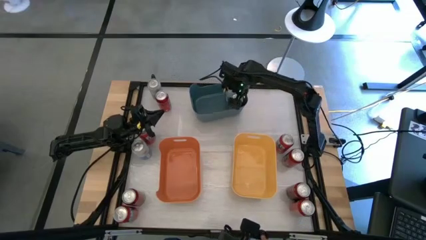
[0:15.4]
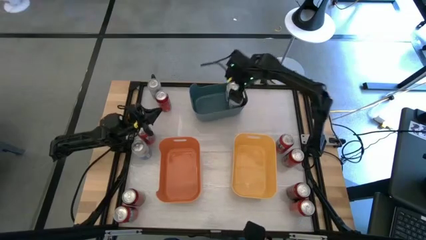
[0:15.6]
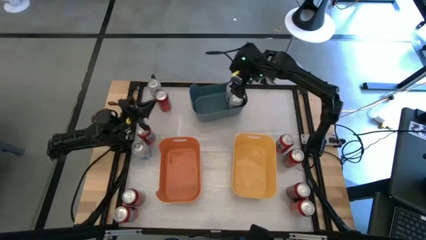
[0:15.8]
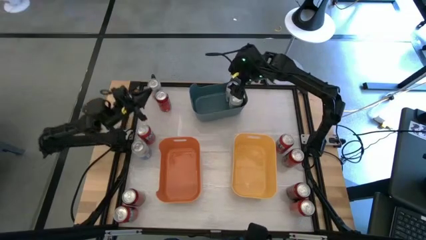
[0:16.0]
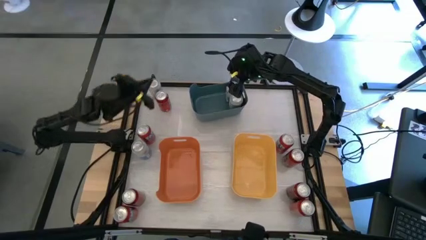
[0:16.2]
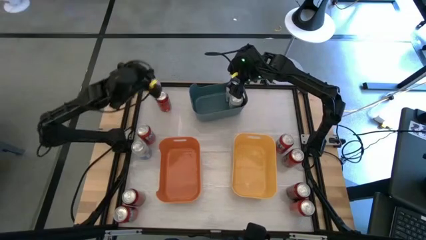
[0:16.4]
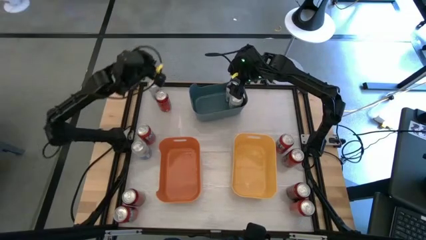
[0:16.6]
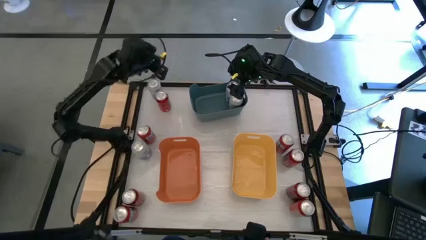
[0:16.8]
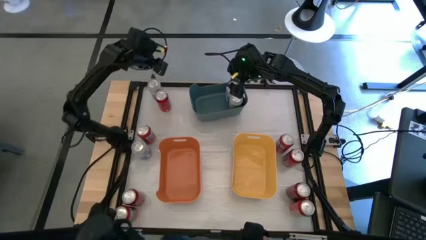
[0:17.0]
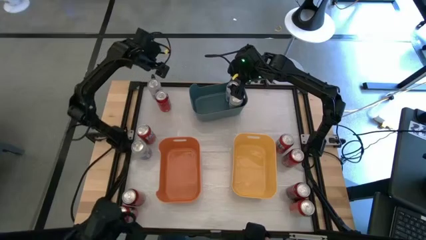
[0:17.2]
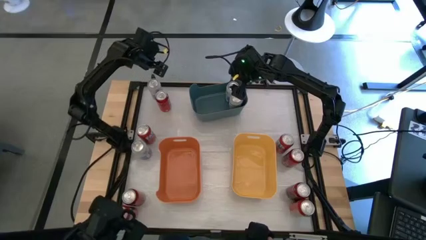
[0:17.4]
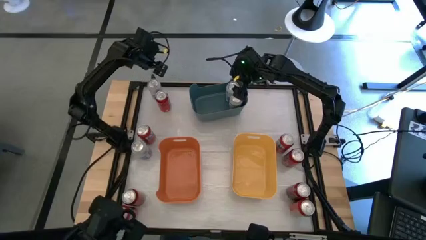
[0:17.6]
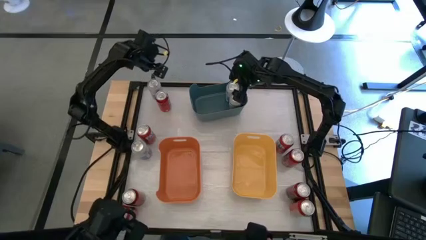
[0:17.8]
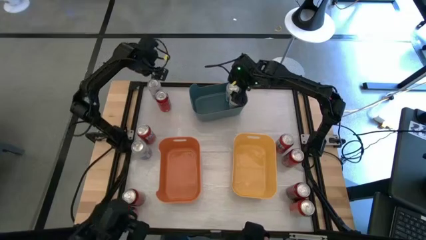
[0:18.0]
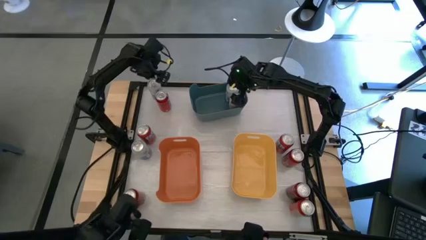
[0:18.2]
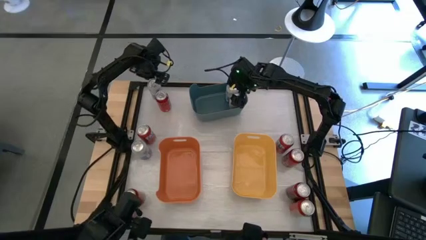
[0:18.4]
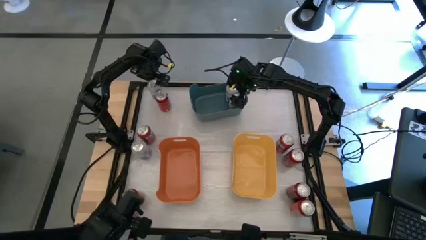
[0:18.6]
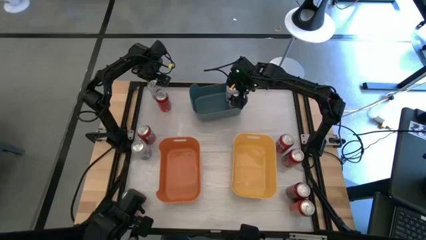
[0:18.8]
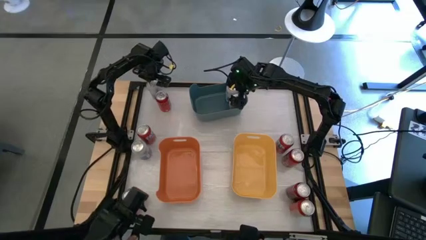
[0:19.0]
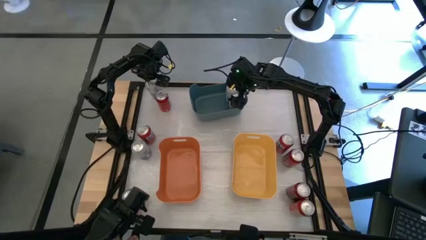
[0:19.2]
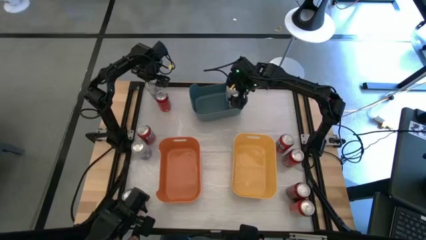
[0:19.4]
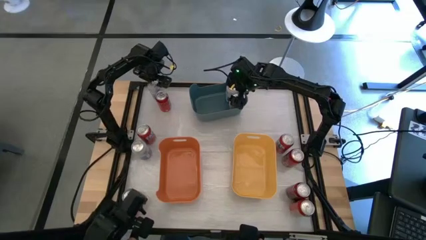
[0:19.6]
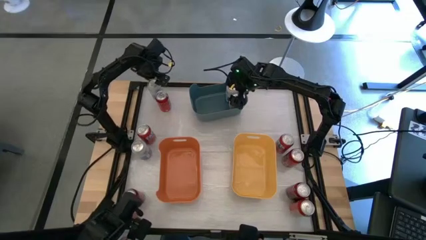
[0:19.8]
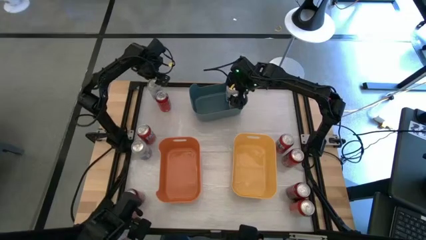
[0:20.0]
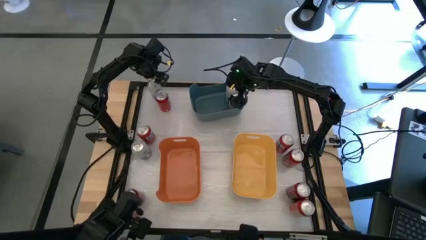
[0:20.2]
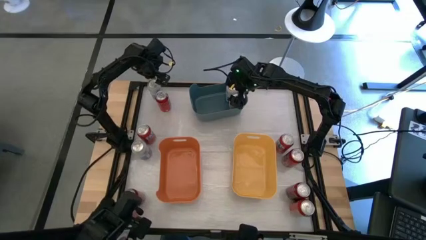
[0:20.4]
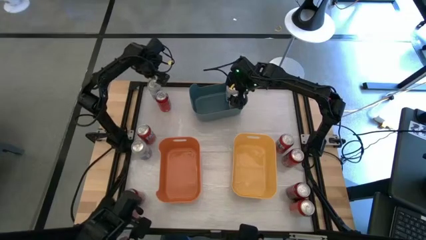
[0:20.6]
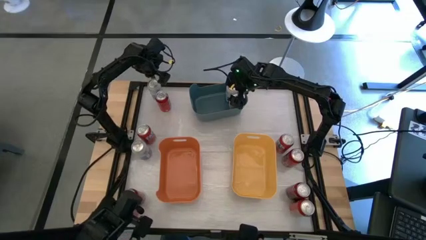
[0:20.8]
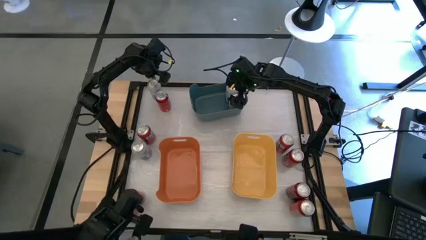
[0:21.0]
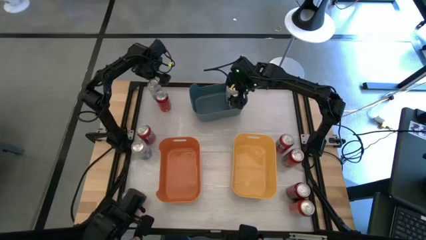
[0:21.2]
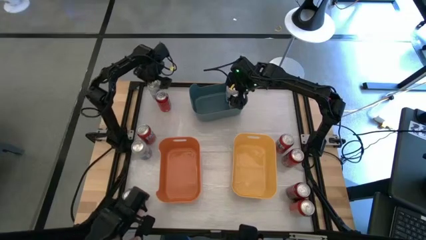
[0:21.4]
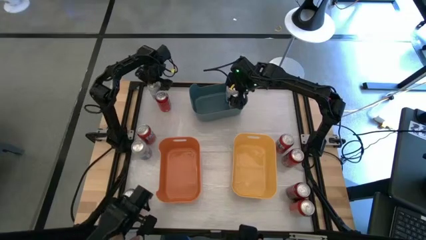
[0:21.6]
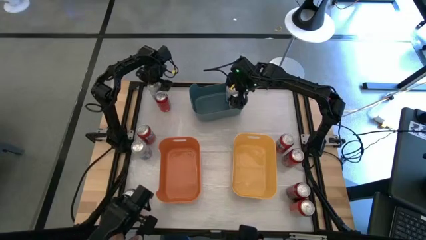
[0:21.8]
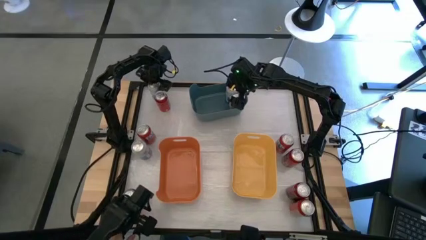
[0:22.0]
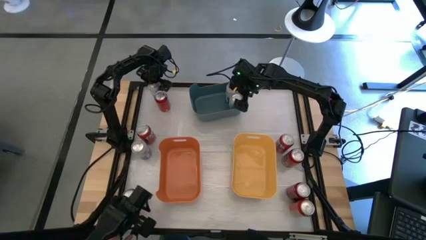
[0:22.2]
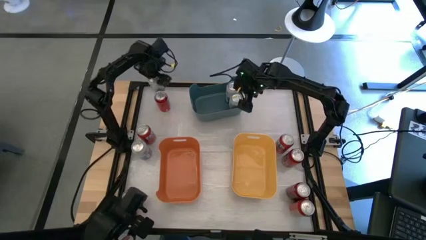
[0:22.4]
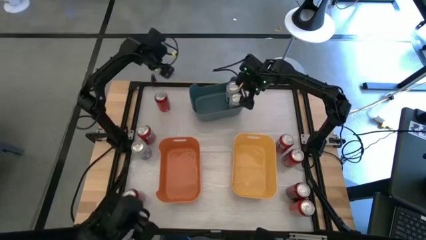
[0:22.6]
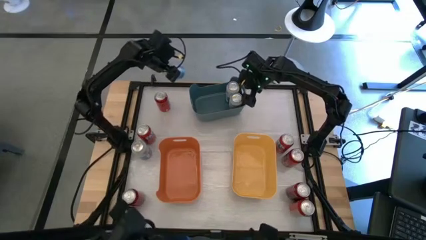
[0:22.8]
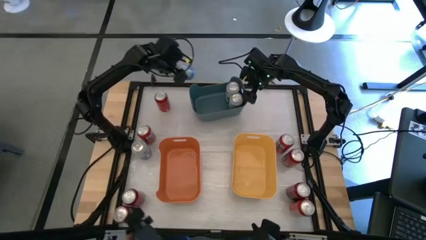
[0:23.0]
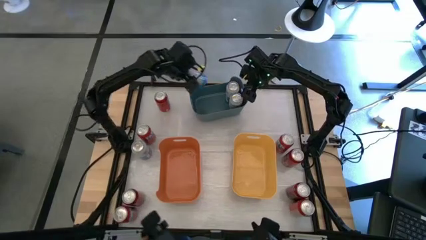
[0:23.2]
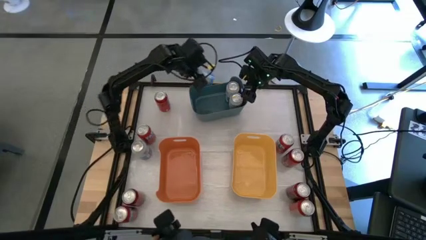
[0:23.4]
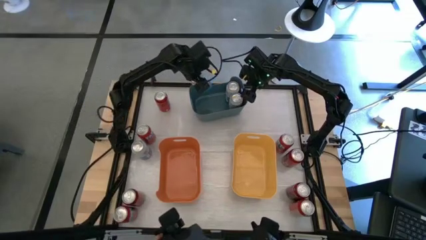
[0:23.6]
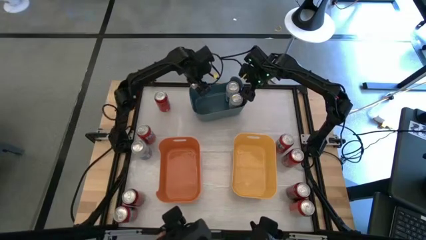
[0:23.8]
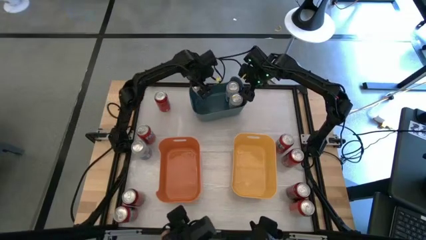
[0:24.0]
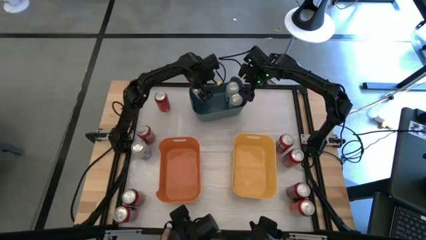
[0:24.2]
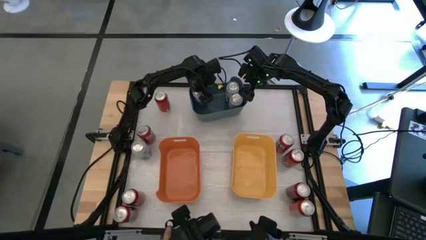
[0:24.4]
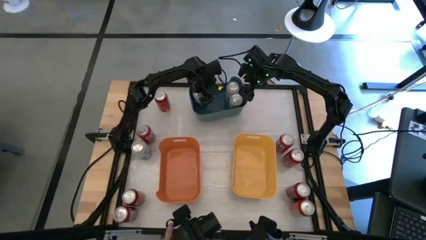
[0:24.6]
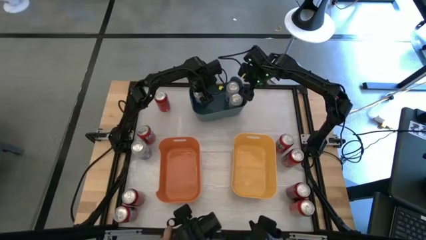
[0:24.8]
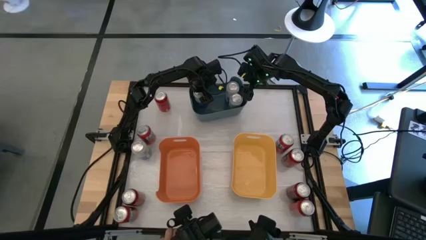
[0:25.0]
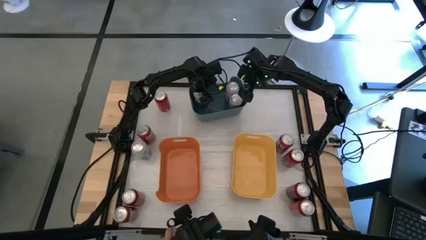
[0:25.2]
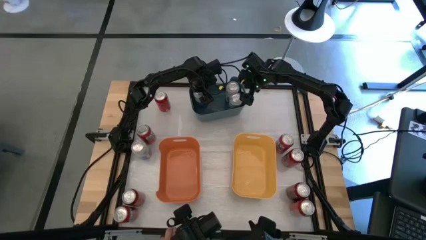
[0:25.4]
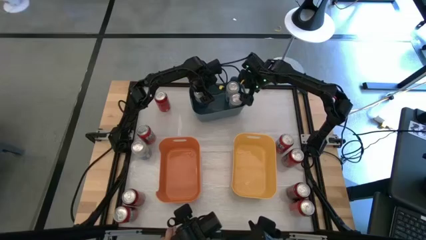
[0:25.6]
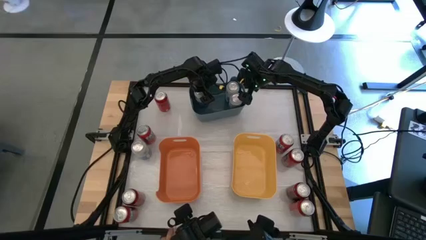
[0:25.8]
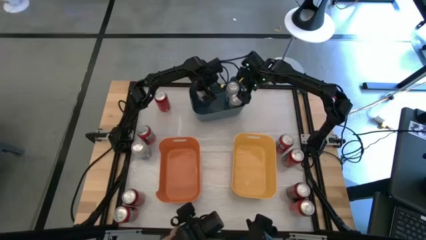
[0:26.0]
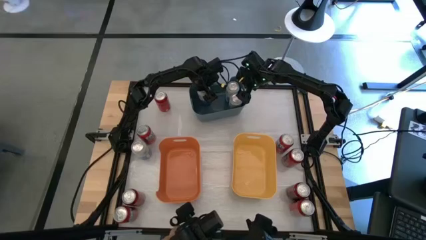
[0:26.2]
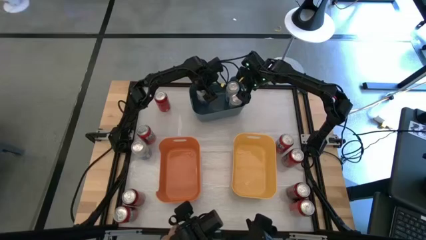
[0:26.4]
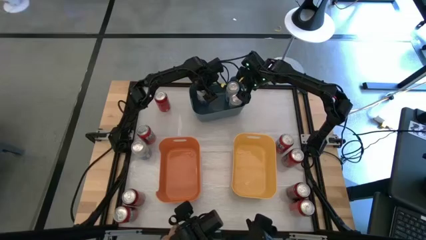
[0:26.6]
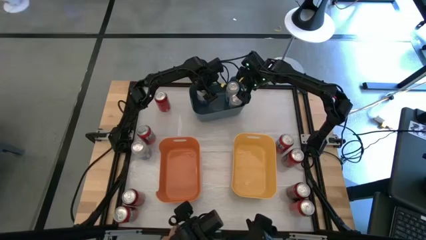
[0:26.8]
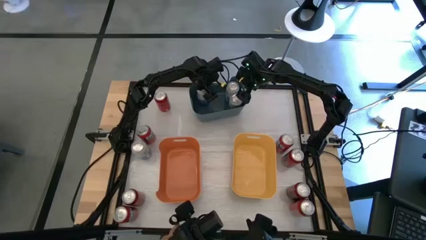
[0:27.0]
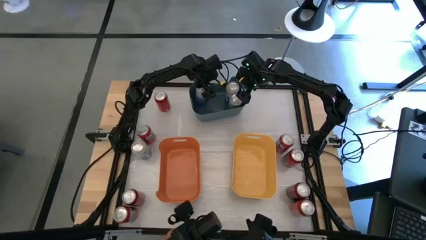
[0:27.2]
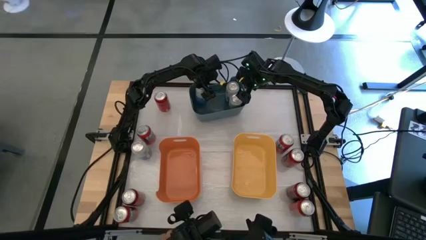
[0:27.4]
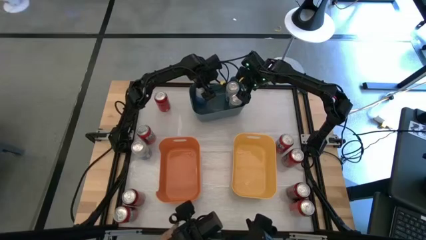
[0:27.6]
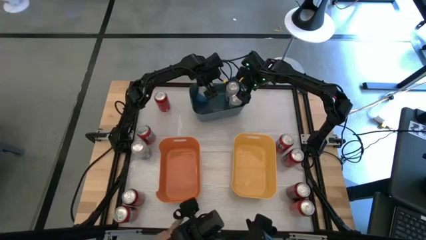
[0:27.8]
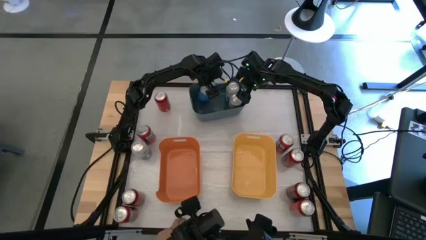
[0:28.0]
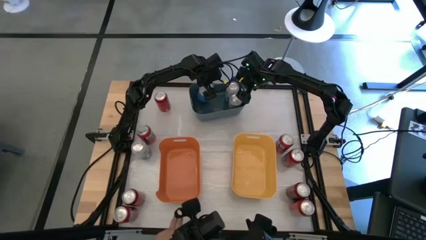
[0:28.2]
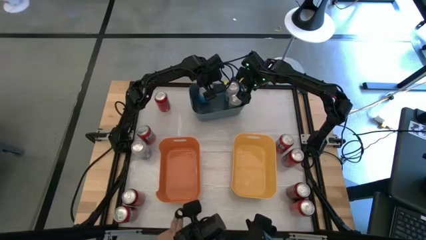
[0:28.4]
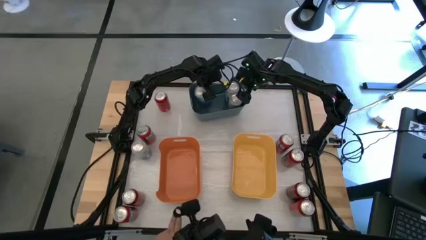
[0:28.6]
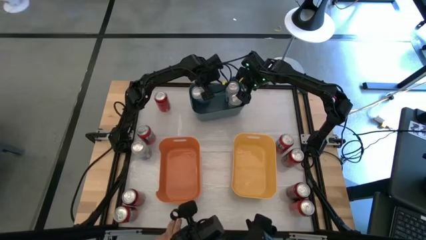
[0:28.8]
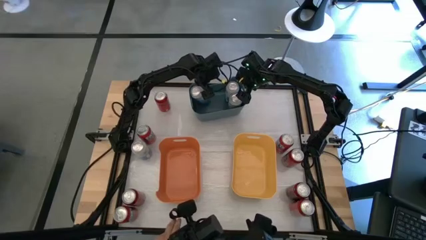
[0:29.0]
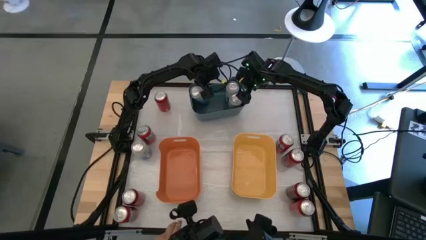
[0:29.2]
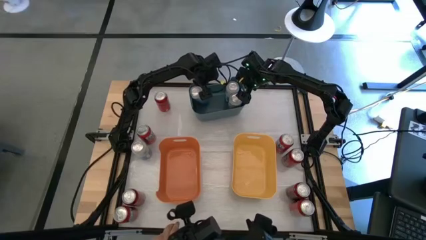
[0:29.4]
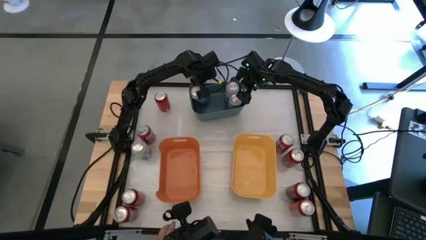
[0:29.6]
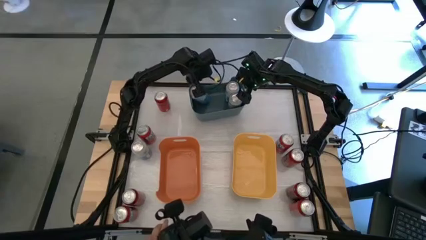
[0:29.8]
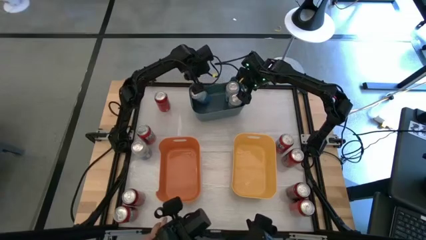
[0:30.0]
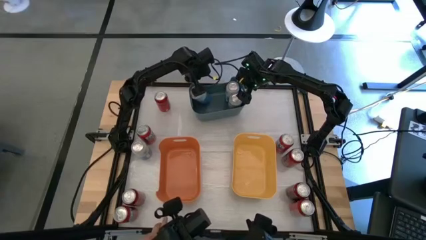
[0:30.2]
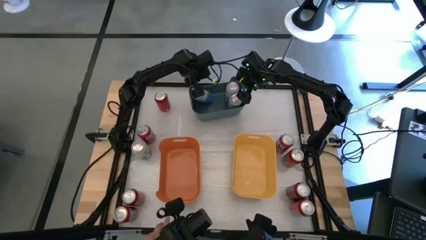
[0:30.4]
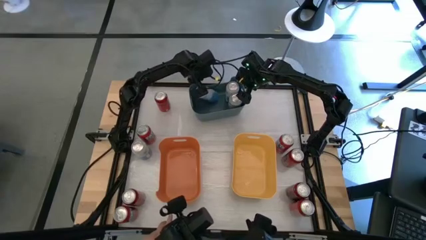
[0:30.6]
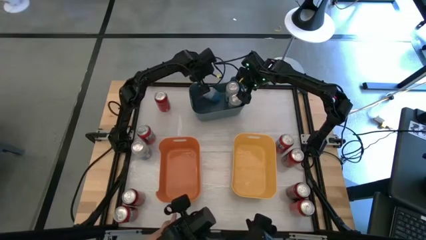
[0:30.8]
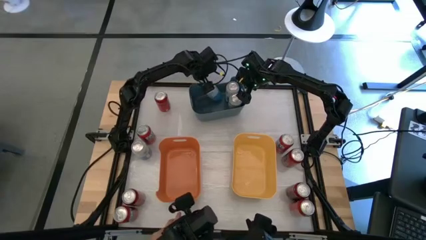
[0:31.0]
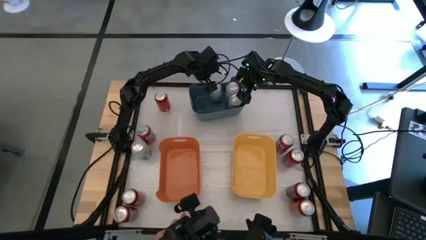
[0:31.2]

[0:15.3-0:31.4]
Task: Sort soda cans
Put the top blue-white soda can into the green bin
